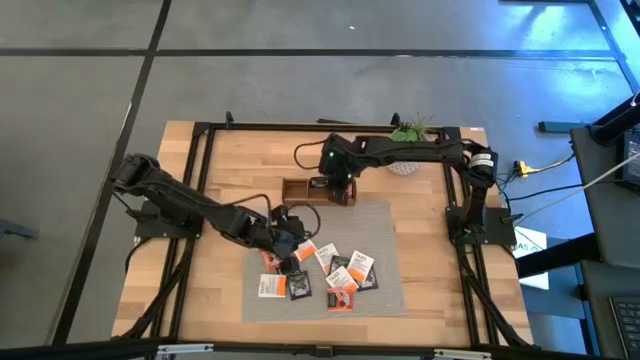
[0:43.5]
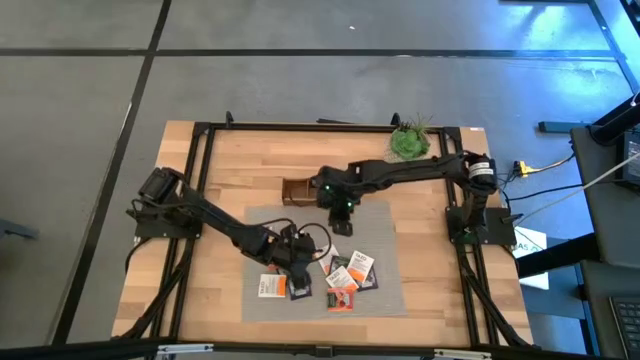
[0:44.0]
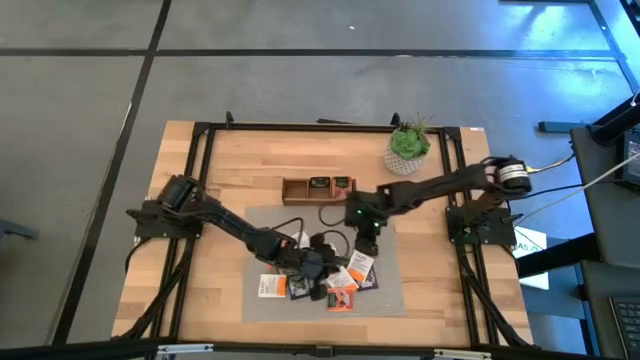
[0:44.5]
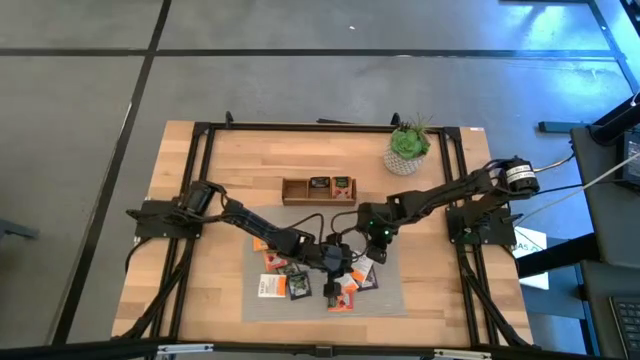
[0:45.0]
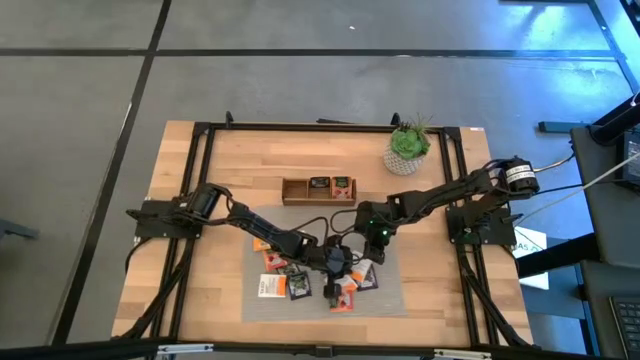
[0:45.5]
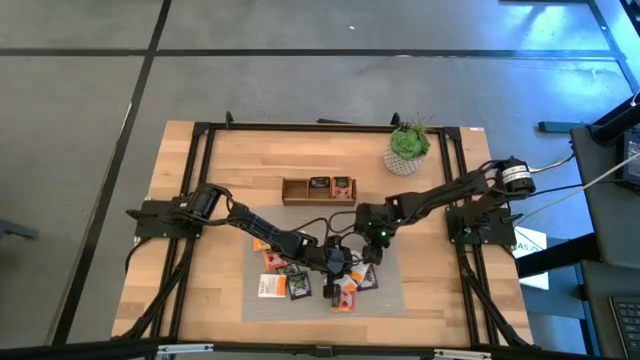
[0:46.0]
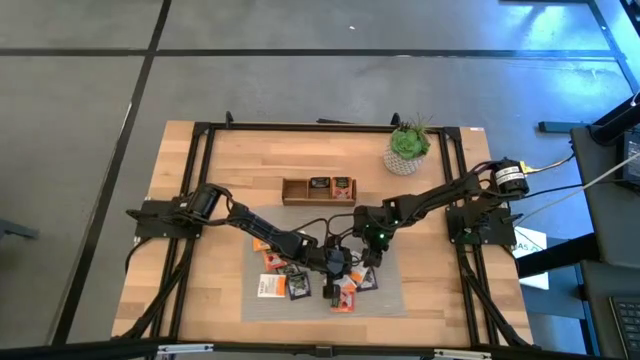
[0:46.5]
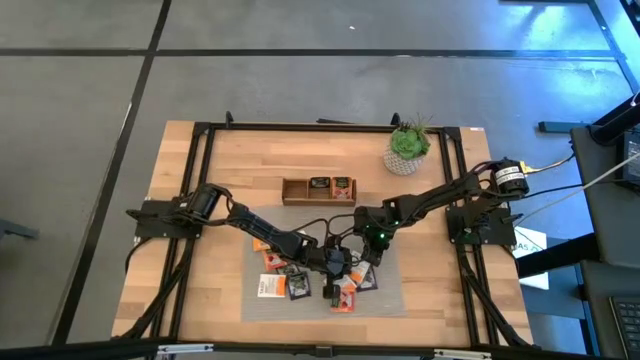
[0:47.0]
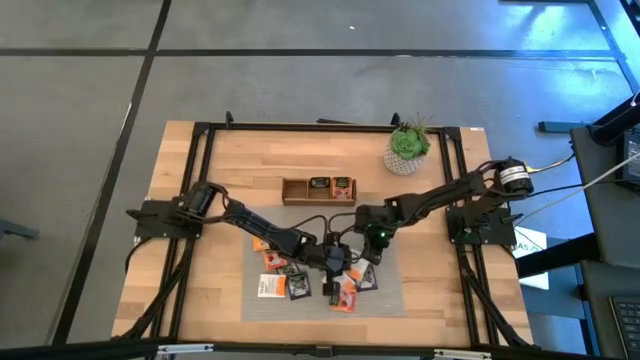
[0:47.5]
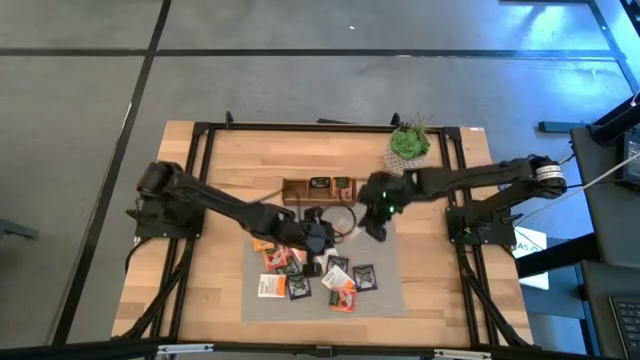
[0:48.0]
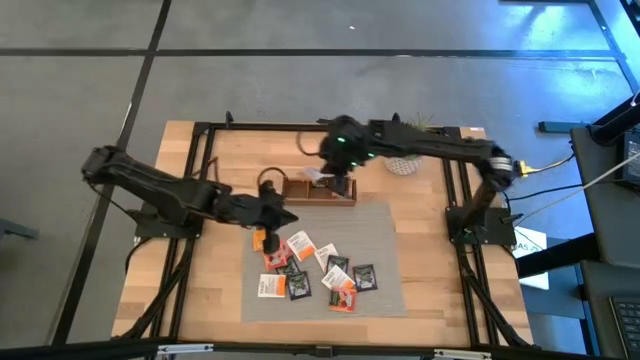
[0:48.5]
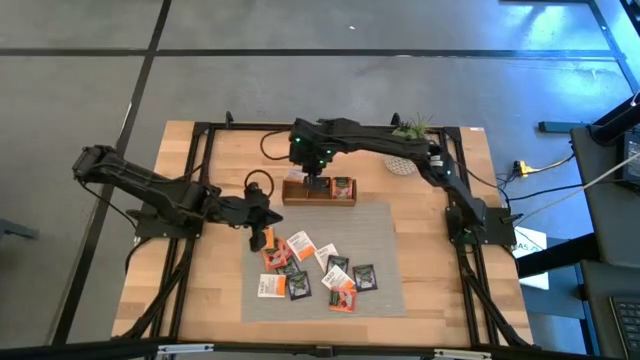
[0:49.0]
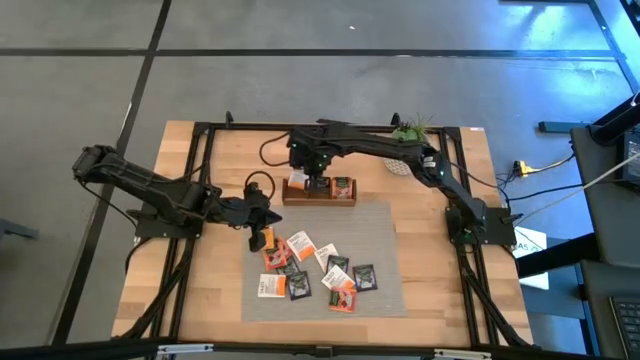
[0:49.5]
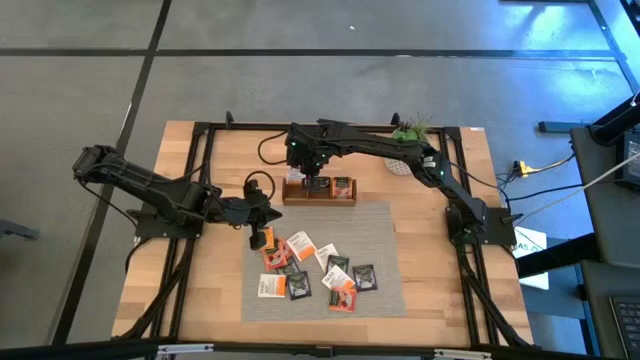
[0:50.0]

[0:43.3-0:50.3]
Task: Pick & Place Tea
Put the white tea bag into the left section of the wooden organizer

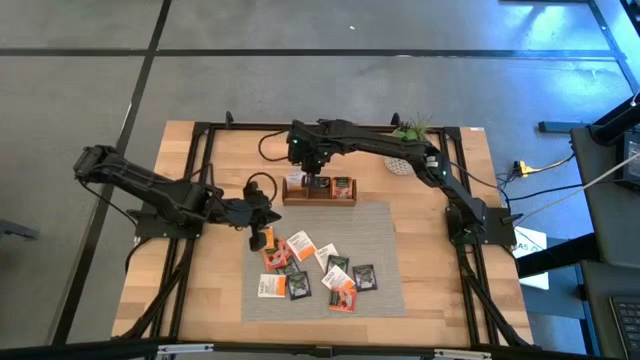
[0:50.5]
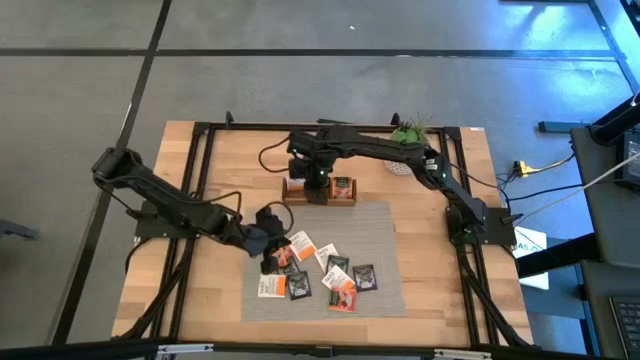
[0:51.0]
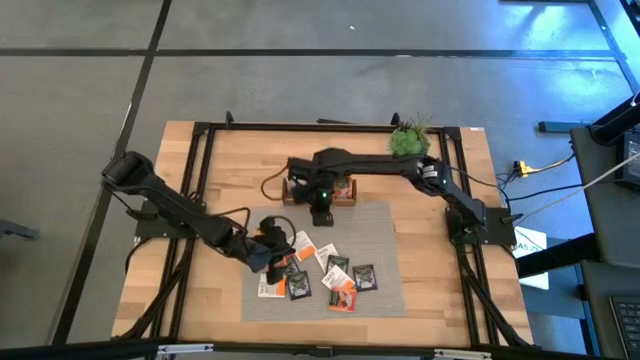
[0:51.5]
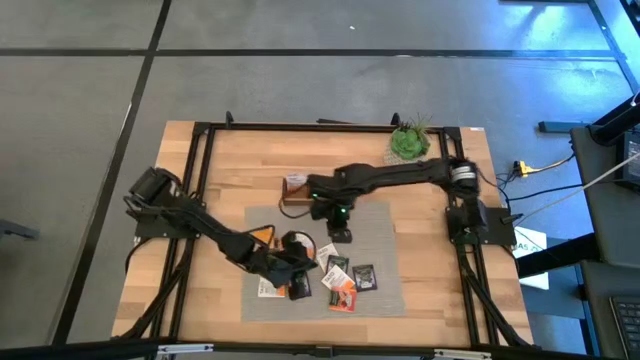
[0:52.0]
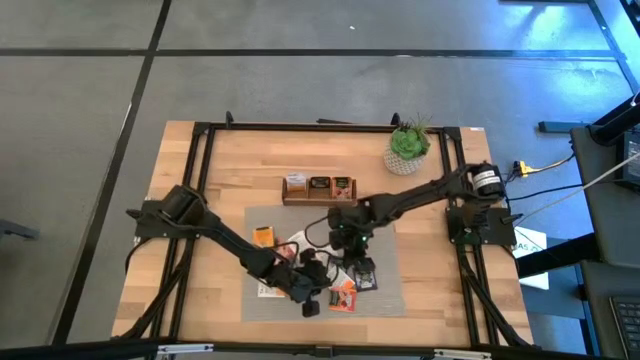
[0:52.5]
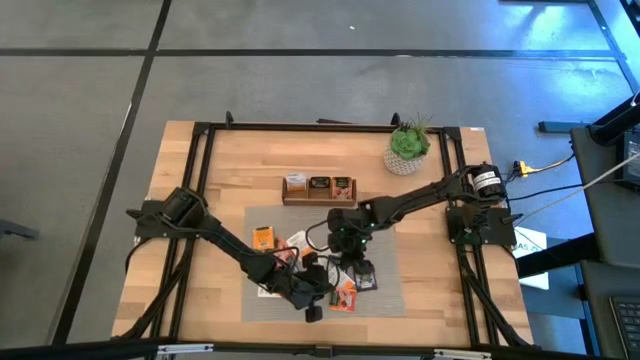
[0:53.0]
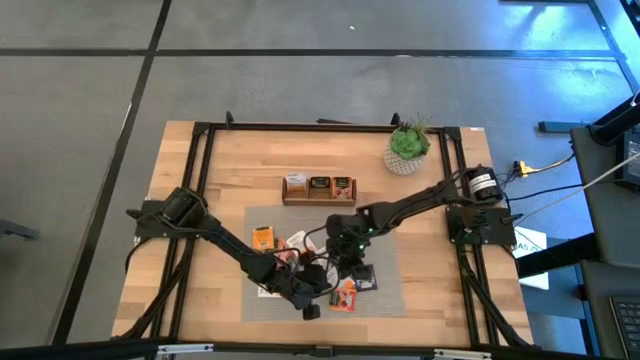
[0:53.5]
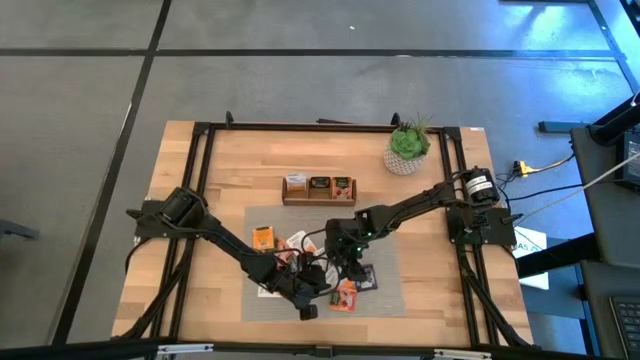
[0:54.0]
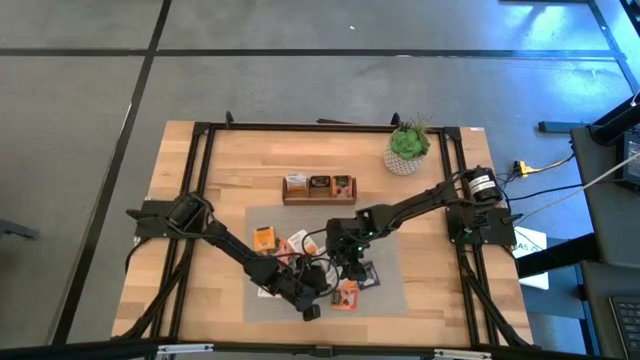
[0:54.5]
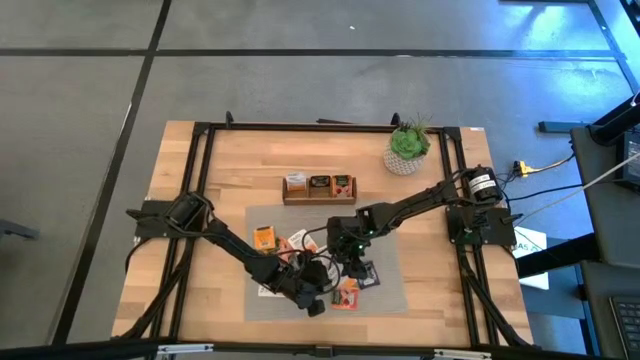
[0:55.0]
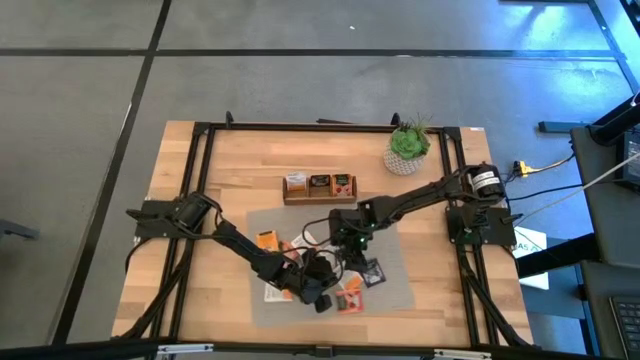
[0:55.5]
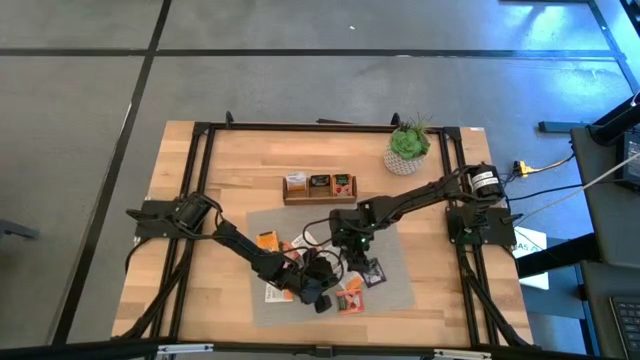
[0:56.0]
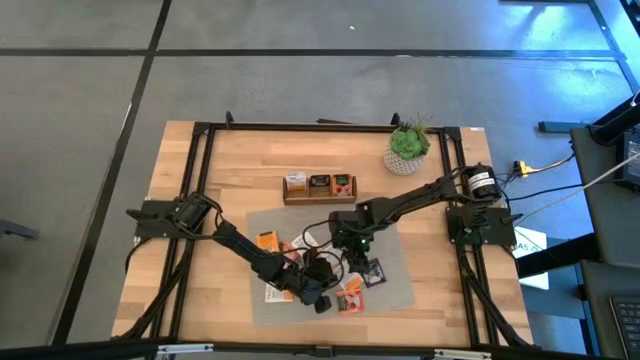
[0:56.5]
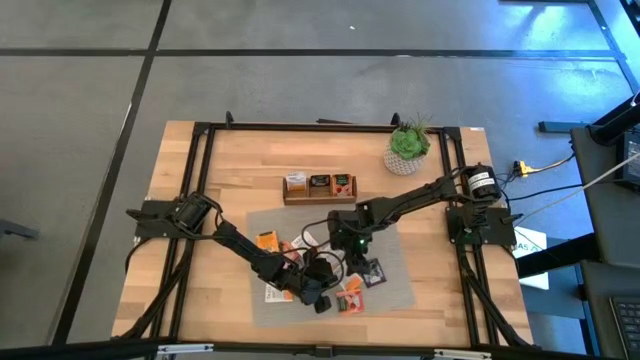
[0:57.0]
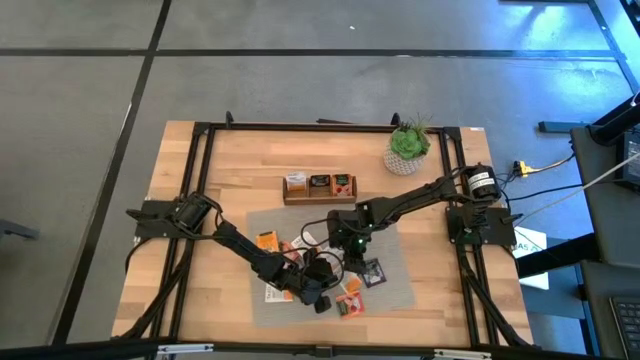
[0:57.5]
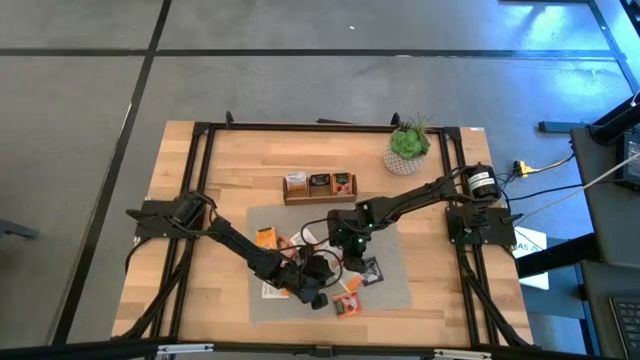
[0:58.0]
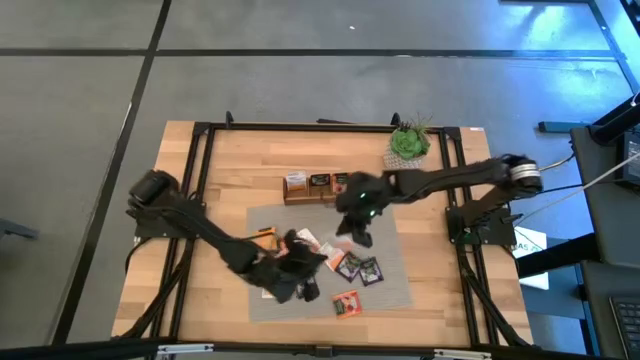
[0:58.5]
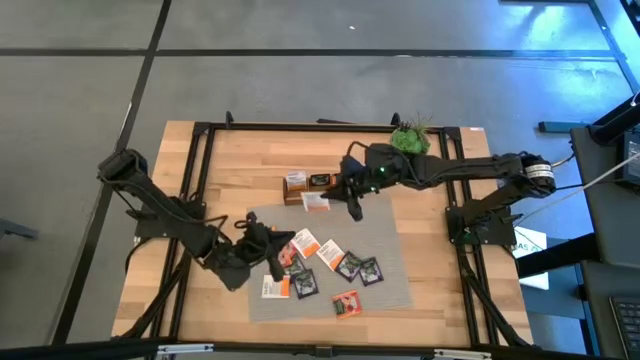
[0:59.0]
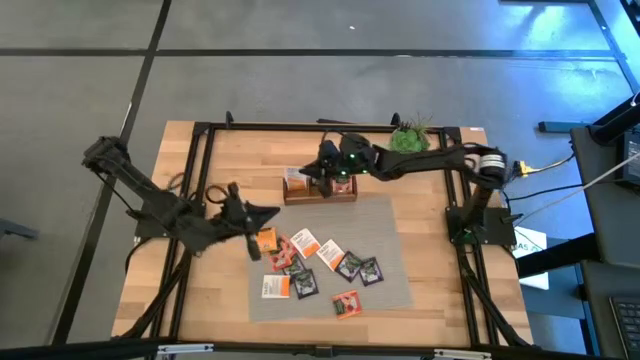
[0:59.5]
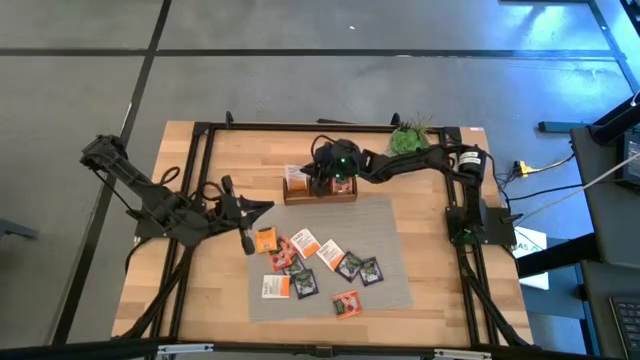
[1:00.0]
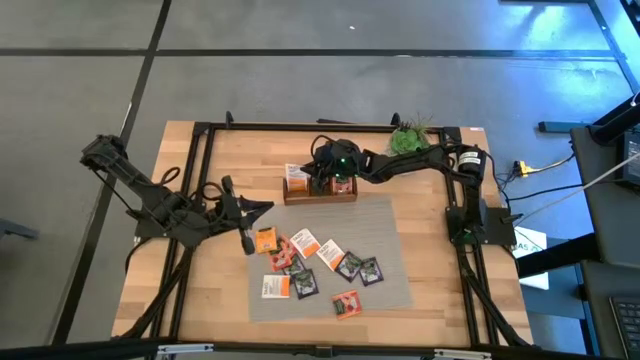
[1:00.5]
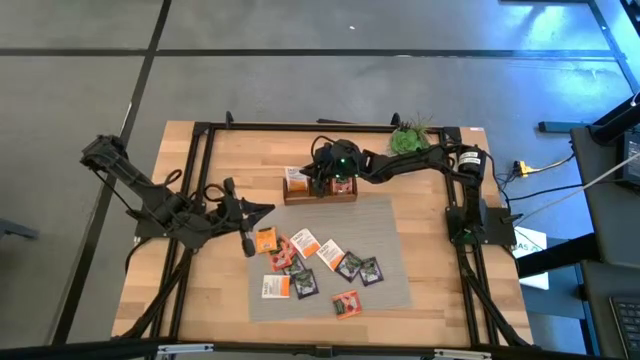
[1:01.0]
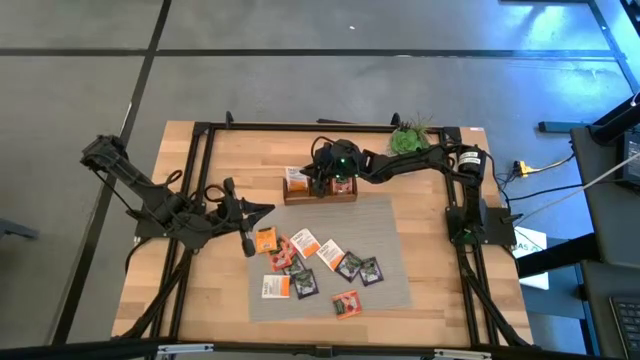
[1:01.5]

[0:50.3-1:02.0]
Put the white tea bag into the left section of the wooden organizer
